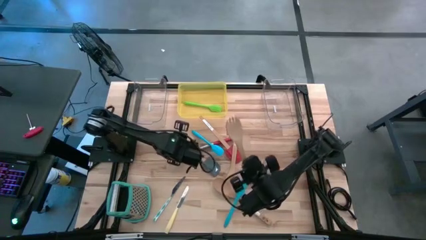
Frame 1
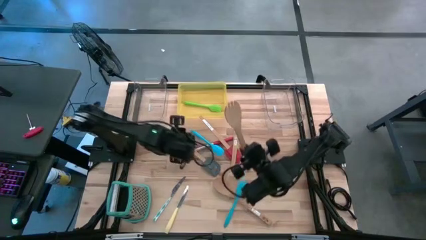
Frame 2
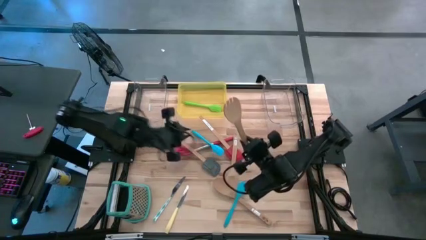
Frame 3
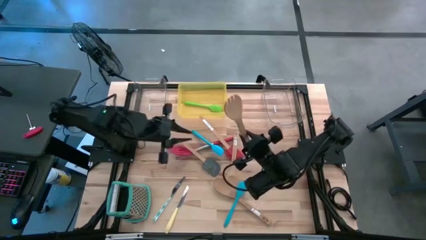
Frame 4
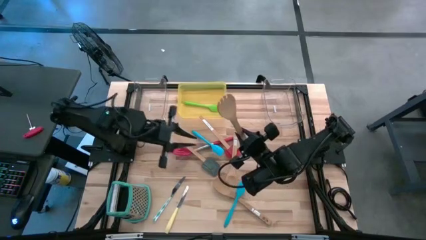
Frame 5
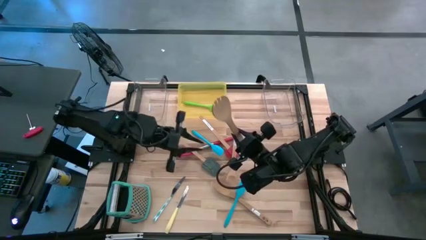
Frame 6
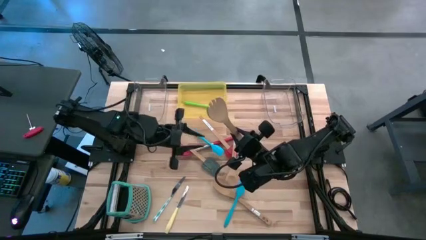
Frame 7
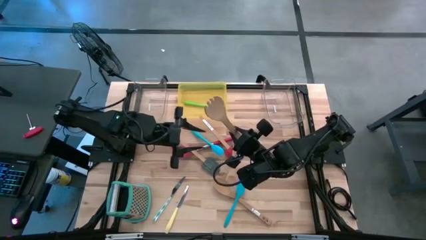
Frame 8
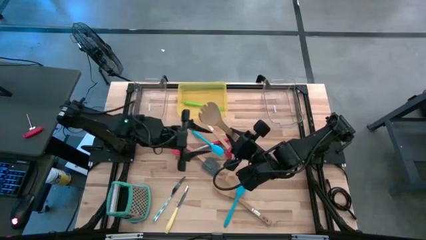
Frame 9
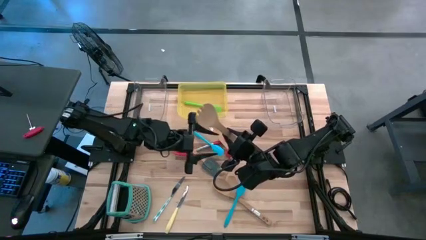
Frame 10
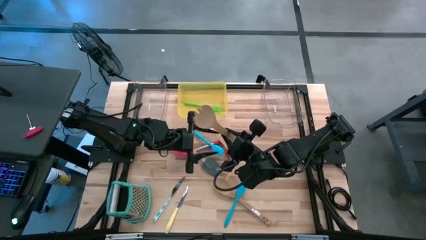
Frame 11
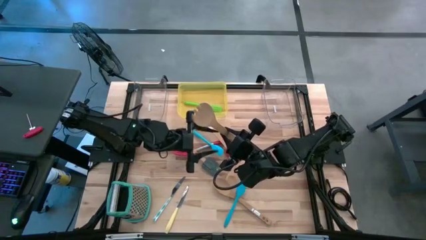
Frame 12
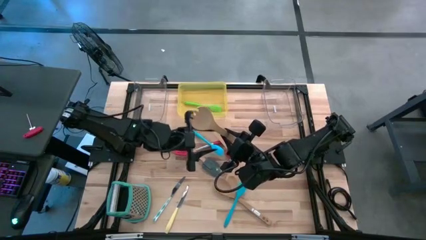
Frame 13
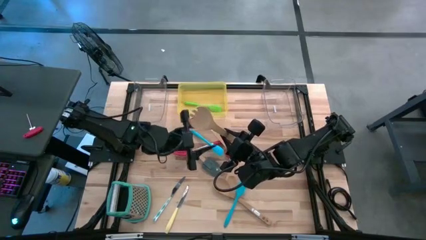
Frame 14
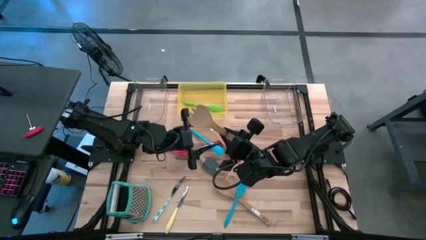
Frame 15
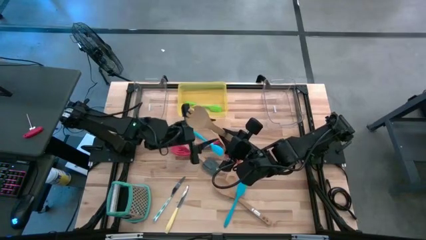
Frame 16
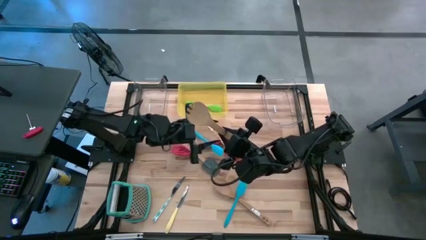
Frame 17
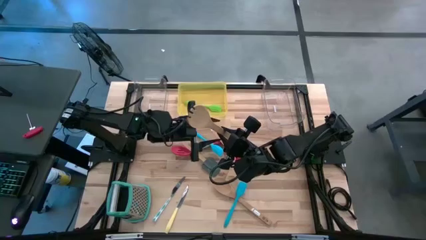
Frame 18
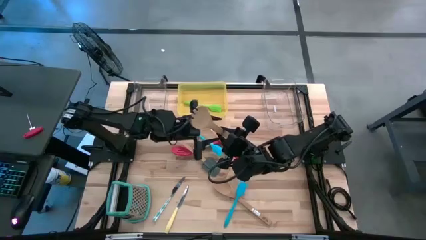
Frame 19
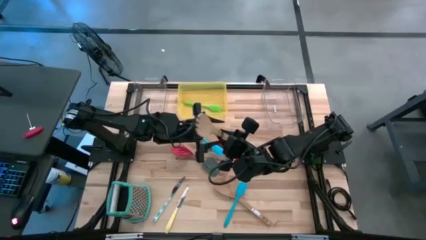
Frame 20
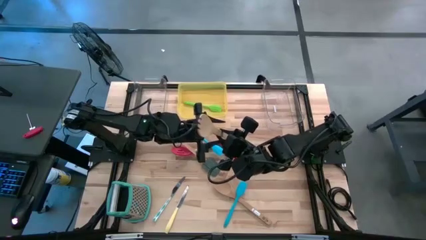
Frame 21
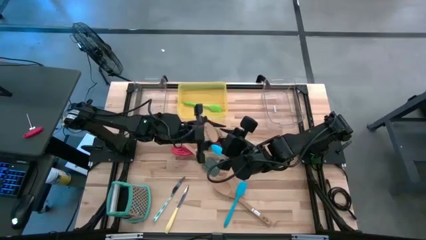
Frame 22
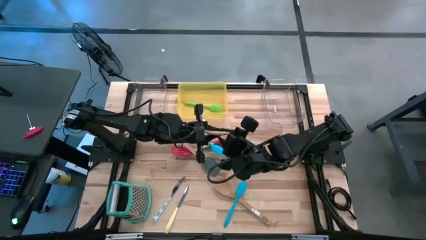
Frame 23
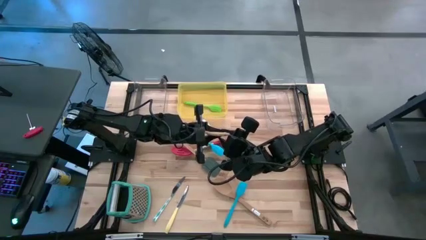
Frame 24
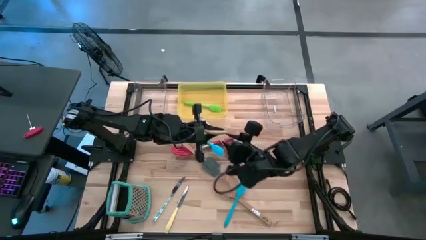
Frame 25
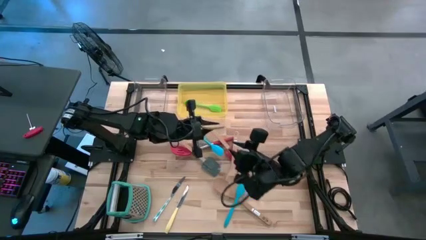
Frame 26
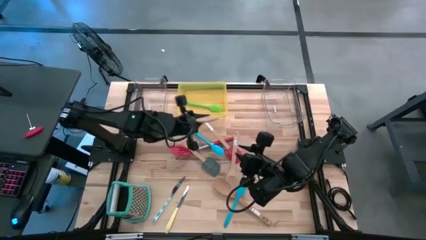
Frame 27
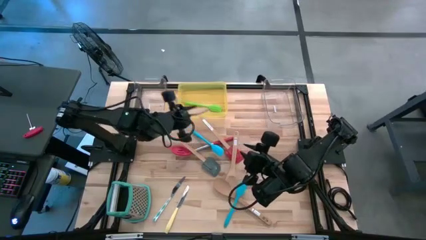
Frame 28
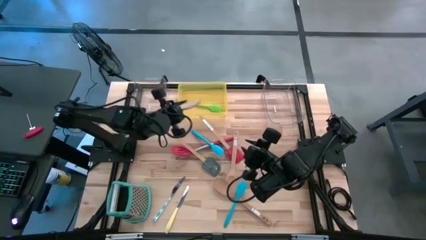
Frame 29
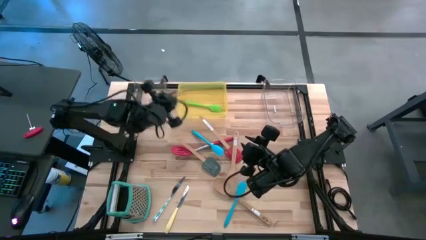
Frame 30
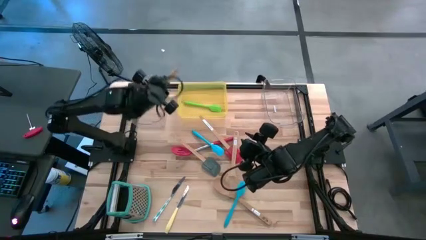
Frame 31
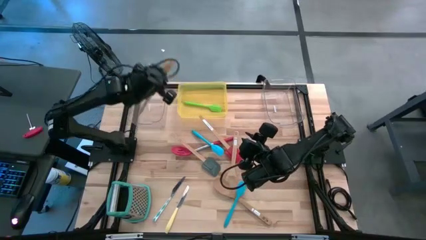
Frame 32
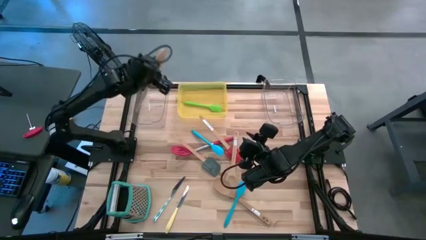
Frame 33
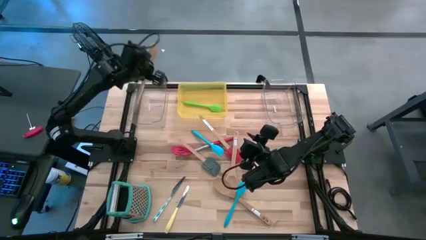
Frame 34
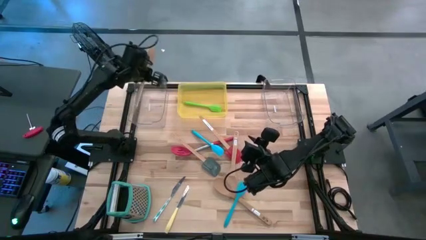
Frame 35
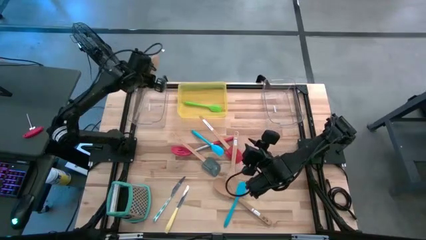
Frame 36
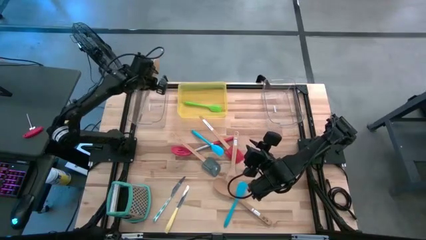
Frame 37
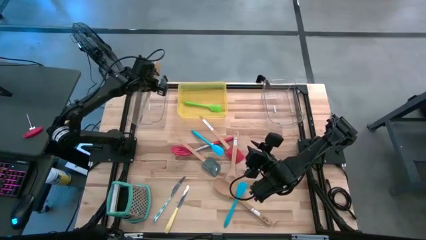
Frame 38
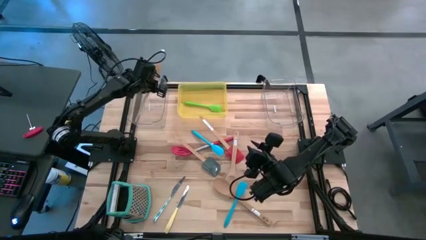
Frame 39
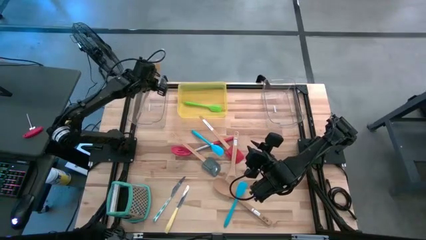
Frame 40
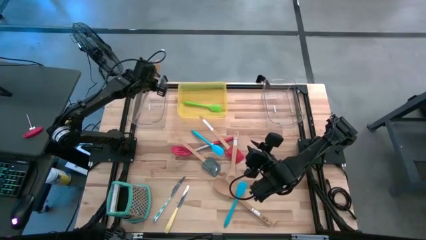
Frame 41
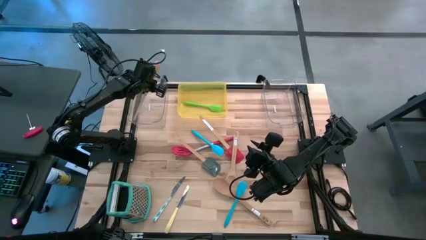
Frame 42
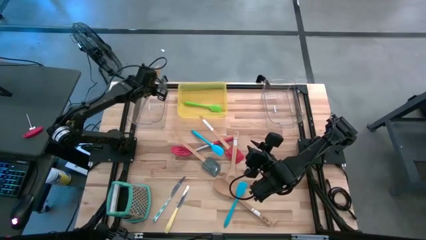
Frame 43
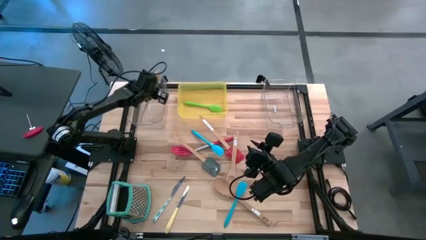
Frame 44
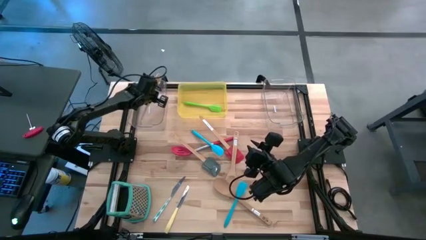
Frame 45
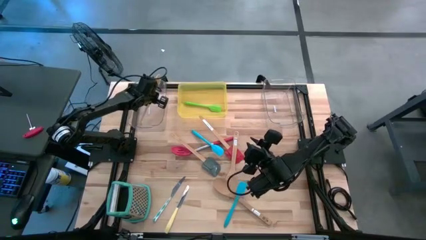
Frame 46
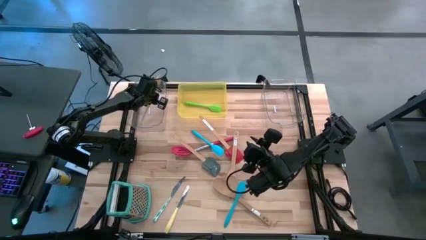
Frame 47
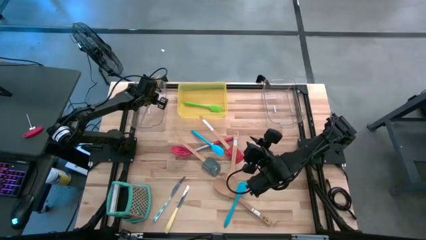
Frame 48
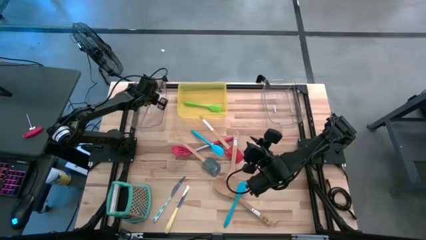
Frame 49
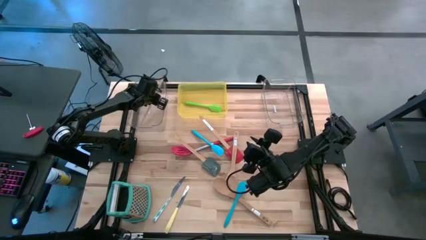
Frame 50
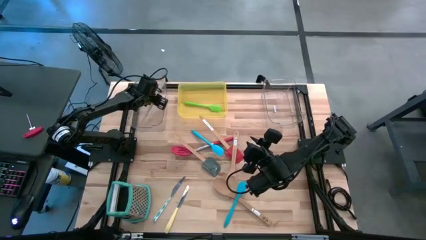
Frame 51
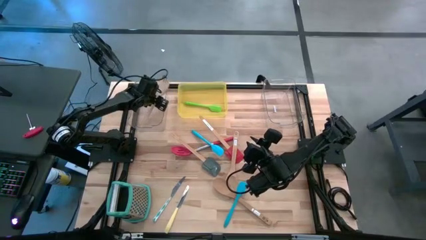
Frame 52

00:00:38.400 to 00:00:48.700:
Task: Pick & Place Kitchen Items
Put the right wooden spork ladle into the left transparent bin

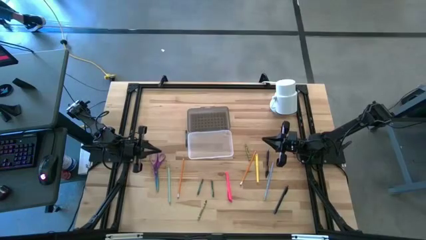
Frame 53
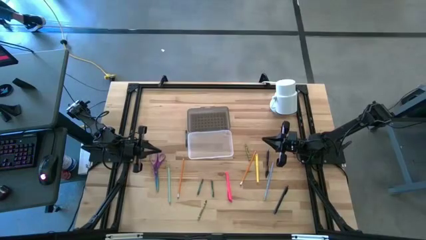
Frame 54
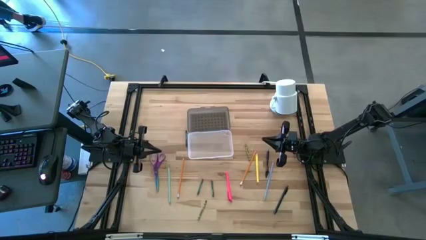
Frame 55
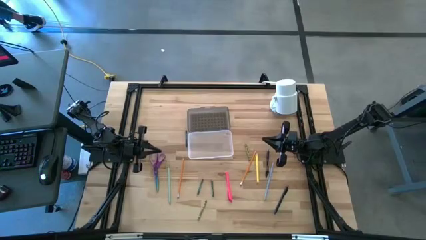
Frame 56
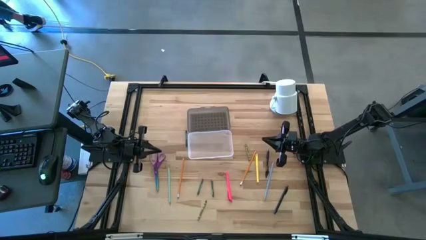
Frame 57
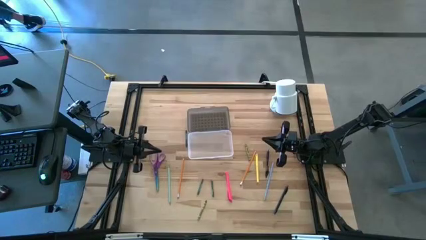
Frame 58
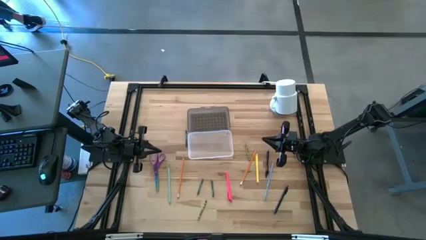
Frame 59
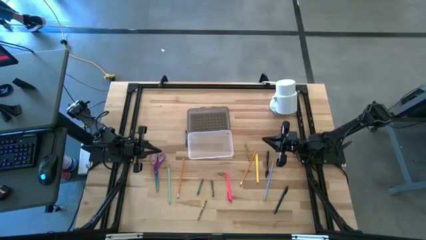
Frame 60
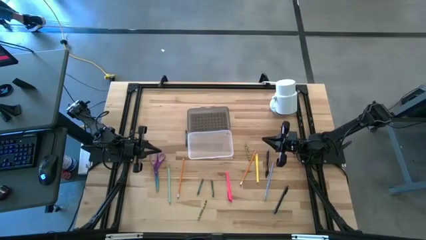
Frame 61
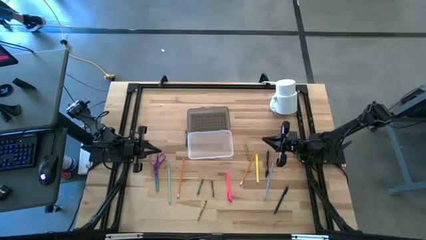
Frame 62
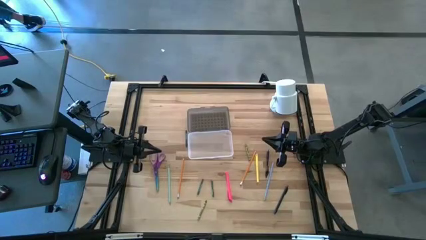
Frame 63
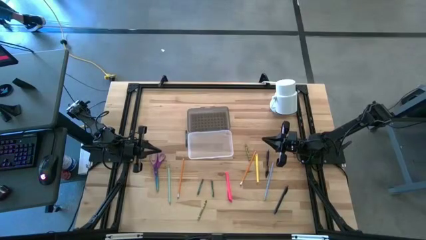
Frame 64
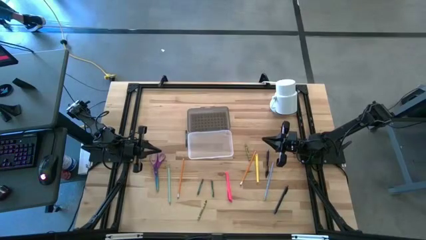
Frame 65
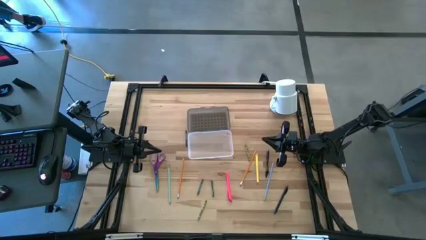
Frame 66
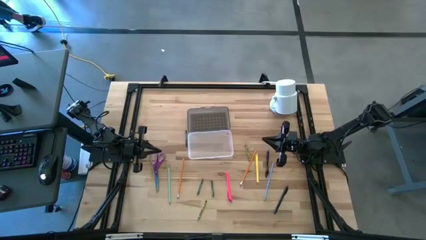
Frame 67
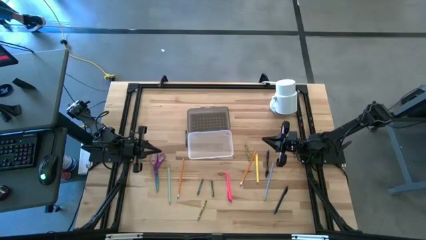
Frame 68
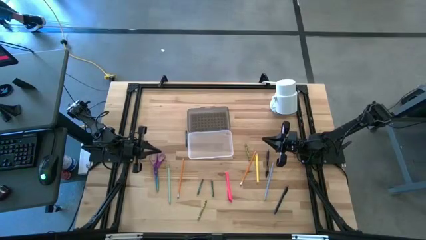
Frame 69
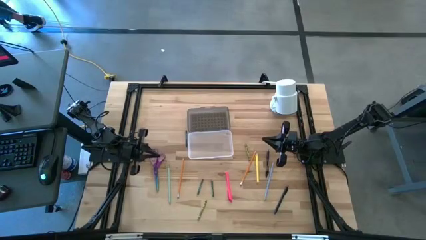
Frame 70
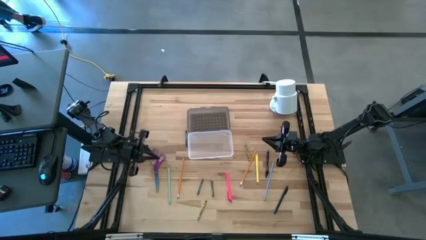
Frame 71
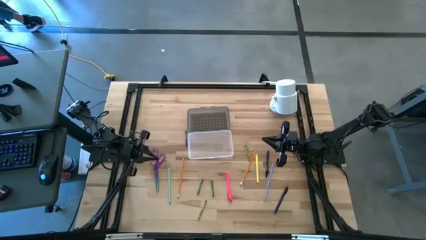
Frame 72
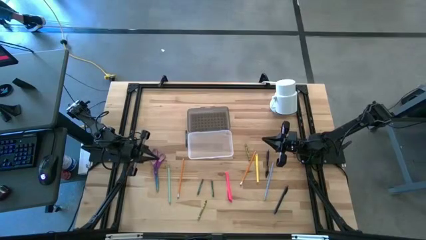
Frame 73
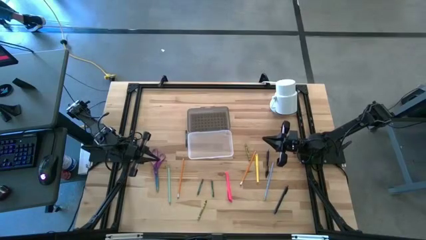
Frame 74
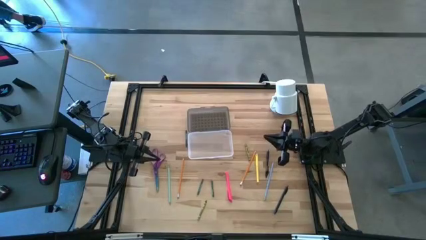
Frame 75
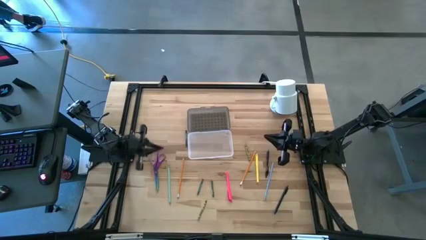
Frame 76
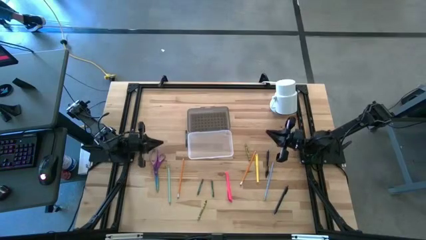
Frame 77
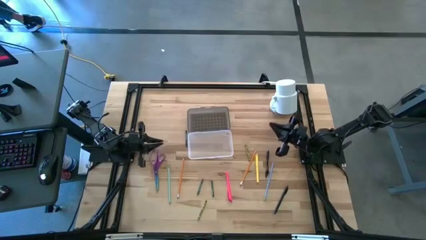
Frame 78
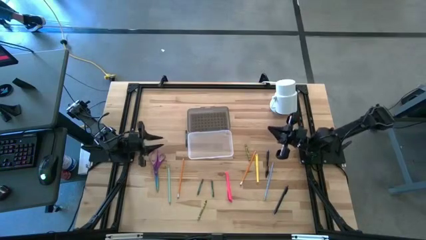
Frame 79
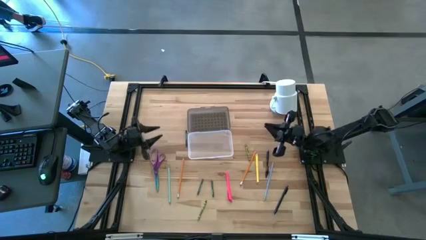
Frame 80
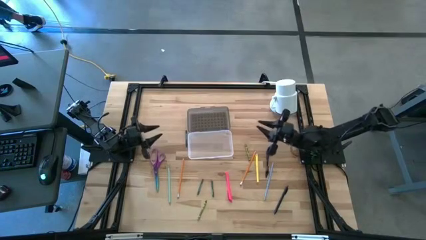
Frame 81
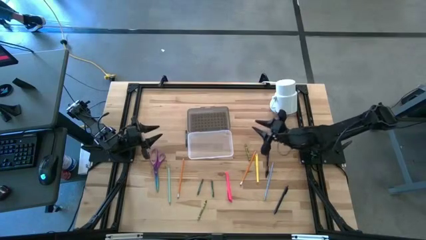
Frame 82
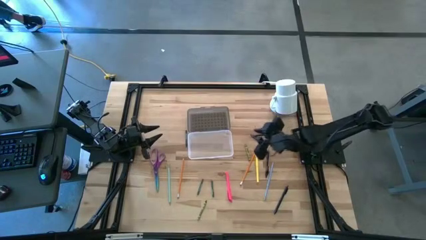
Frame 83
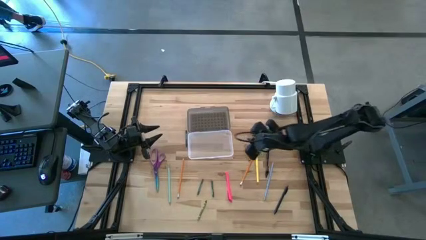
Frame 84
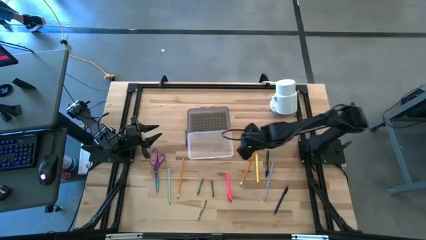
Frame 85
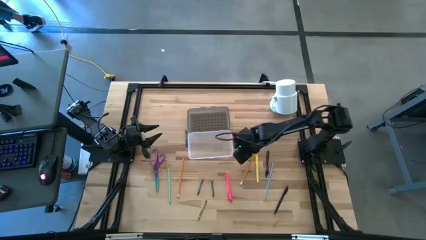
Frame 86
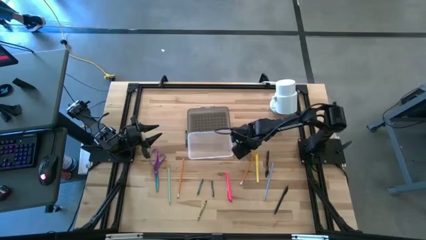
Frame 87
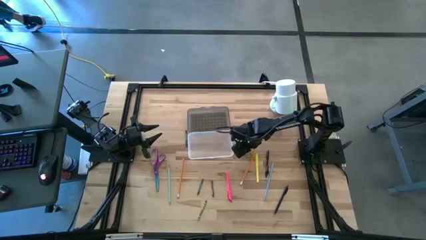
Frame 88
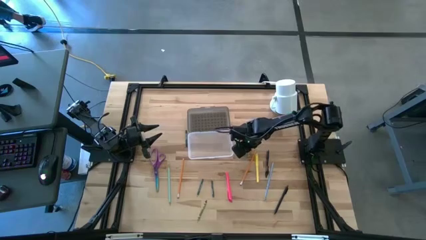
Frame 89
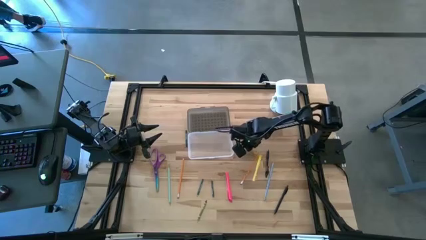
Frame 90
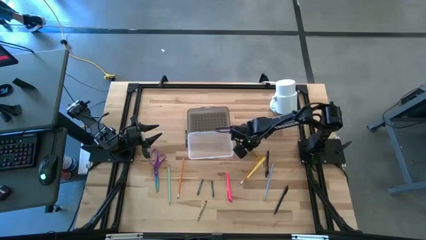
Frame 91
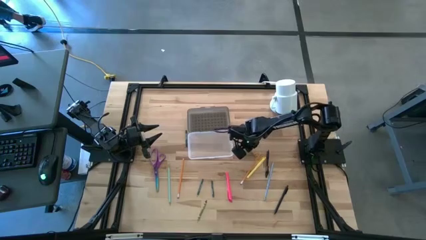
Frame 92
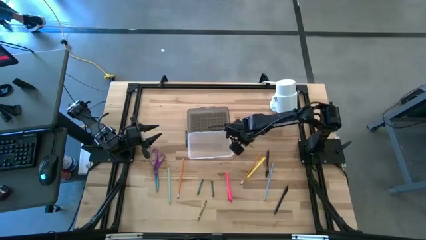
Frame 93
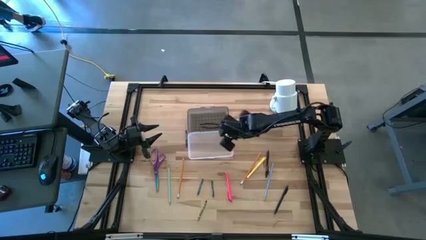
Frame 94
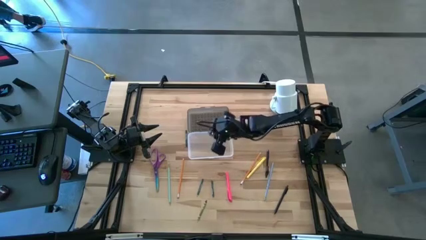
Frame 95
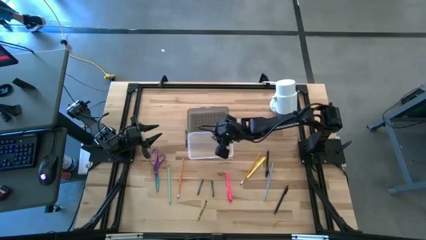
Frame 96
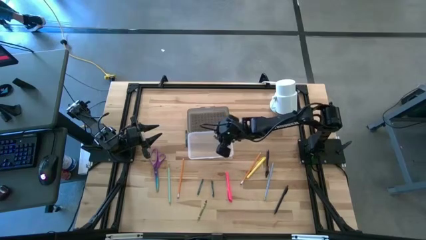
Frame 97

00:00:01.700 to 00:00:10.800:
Task: Pick & place school supplies into a supply box
Put the top light green crayon into the gray supply box
